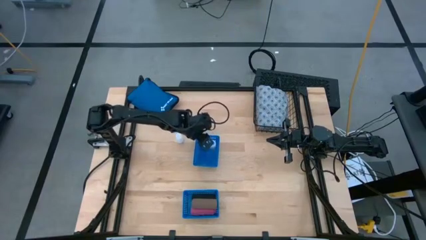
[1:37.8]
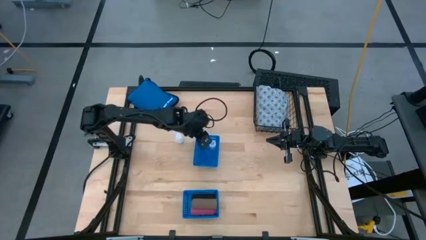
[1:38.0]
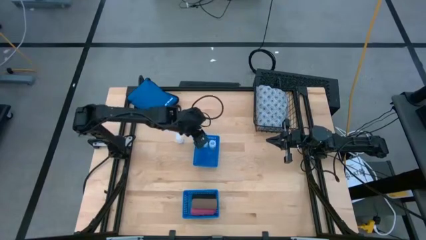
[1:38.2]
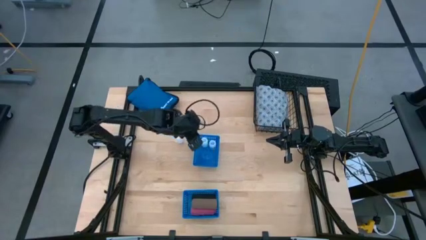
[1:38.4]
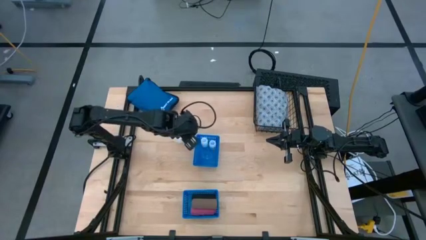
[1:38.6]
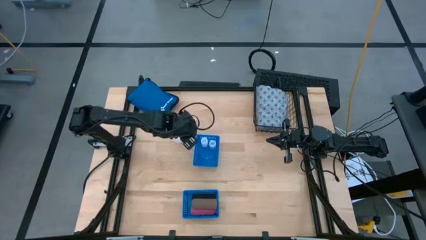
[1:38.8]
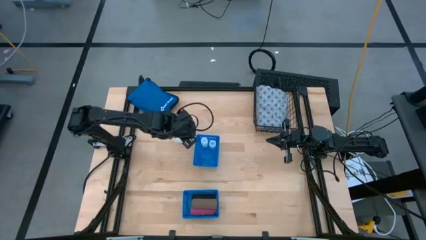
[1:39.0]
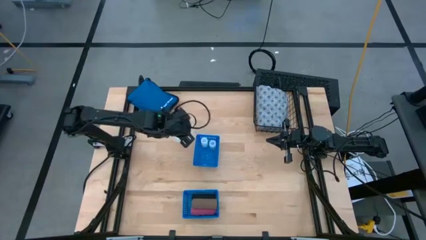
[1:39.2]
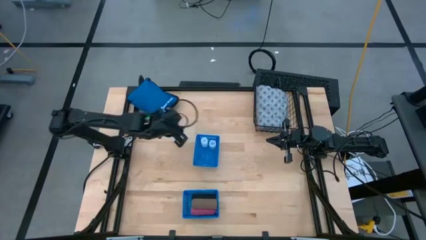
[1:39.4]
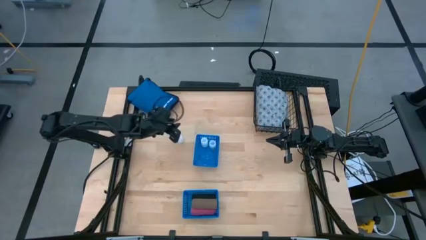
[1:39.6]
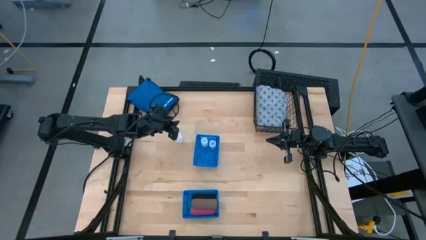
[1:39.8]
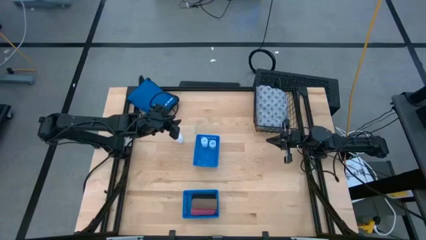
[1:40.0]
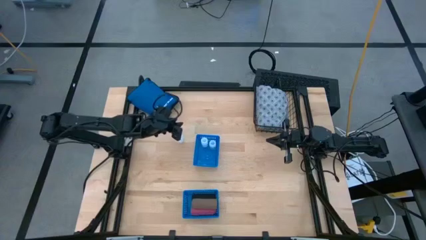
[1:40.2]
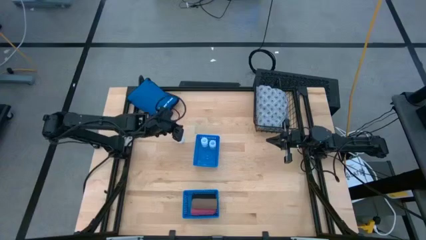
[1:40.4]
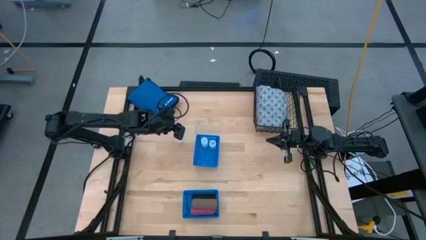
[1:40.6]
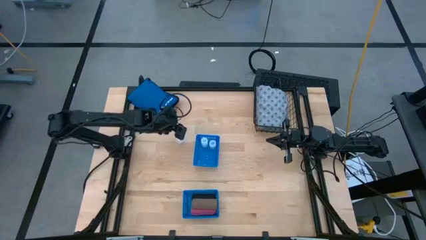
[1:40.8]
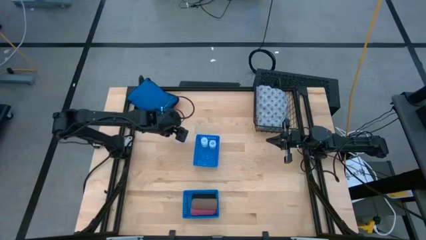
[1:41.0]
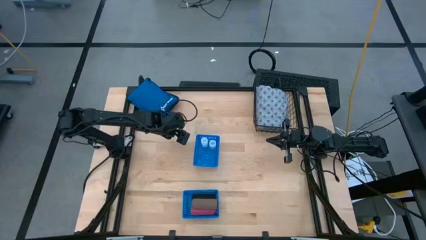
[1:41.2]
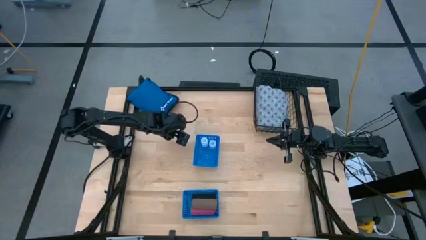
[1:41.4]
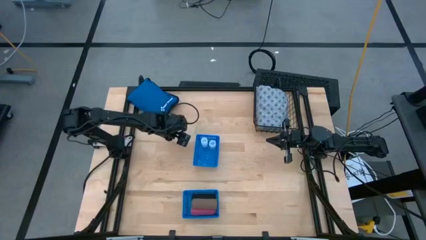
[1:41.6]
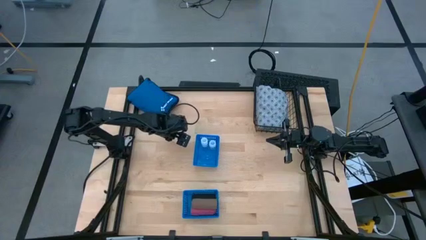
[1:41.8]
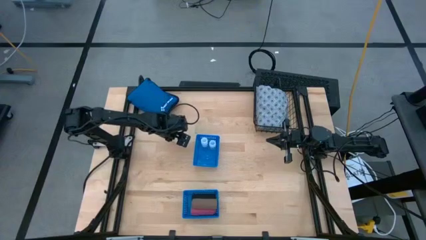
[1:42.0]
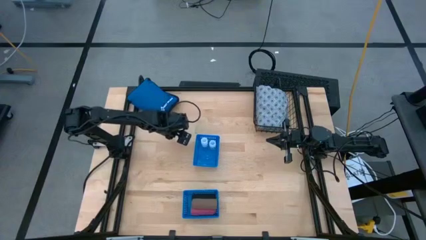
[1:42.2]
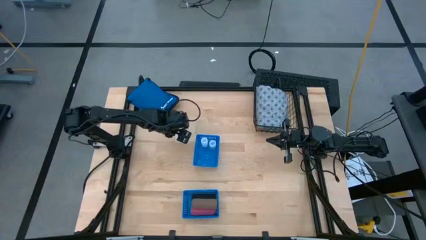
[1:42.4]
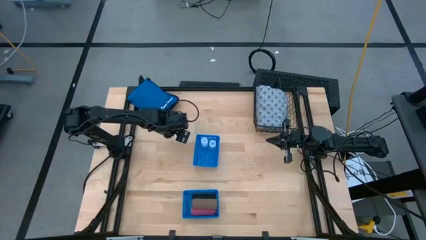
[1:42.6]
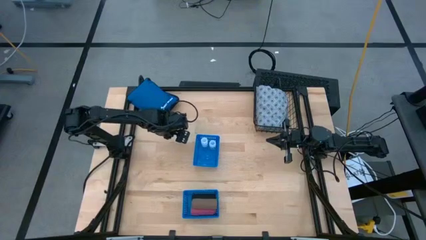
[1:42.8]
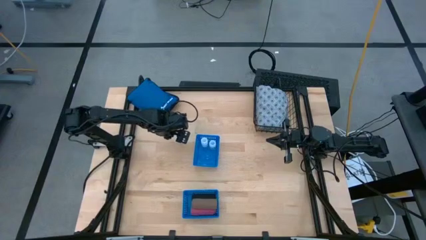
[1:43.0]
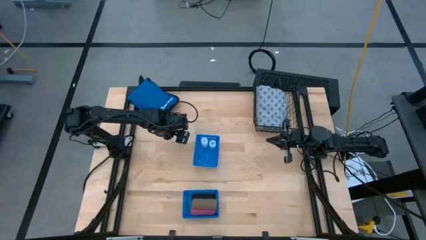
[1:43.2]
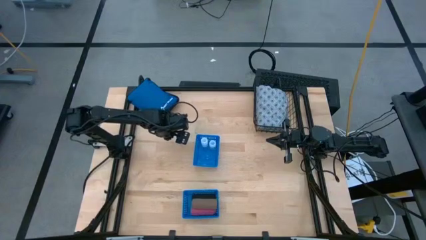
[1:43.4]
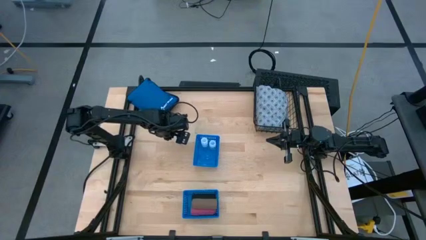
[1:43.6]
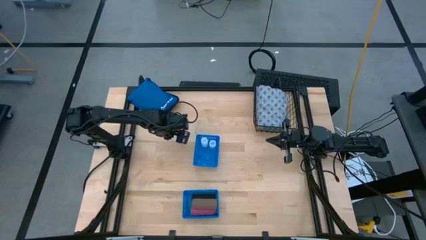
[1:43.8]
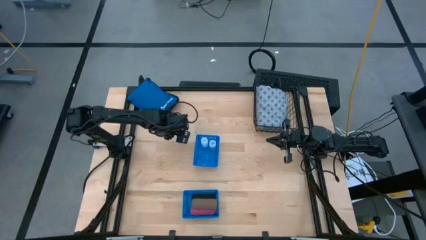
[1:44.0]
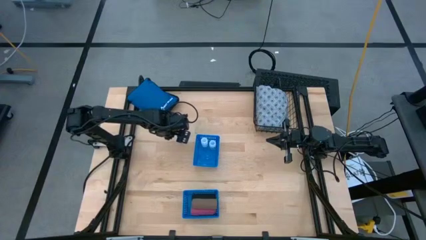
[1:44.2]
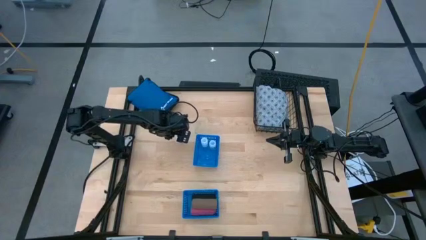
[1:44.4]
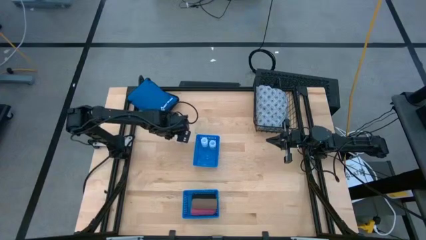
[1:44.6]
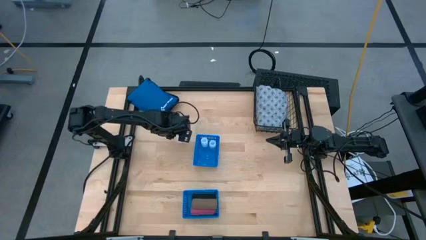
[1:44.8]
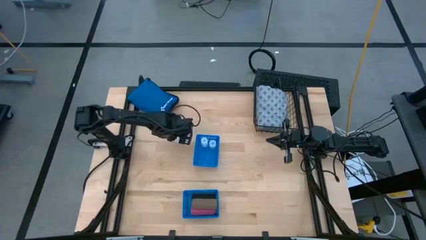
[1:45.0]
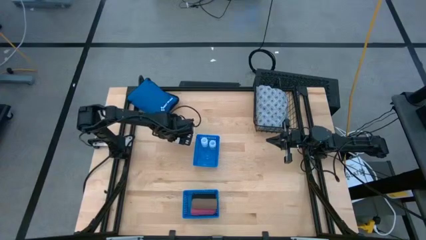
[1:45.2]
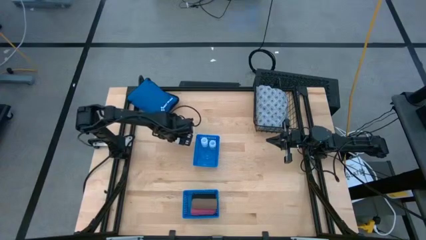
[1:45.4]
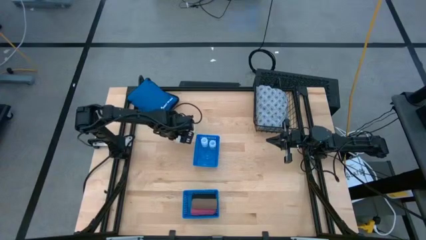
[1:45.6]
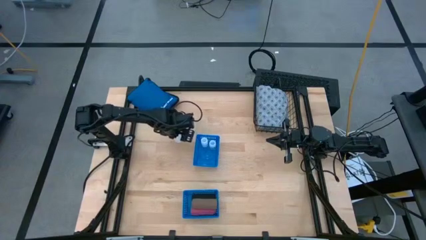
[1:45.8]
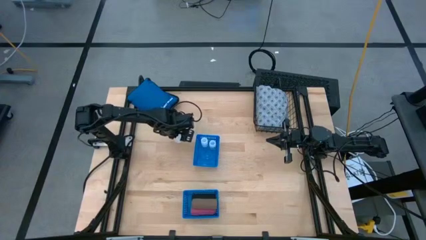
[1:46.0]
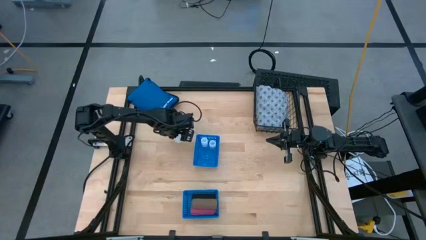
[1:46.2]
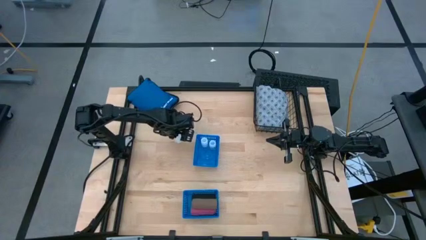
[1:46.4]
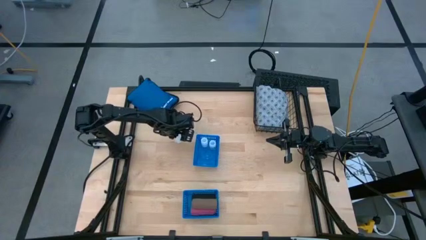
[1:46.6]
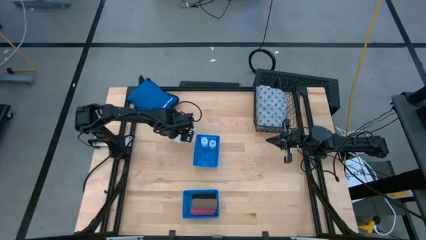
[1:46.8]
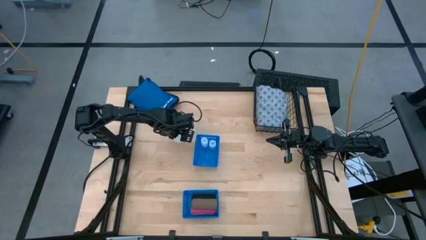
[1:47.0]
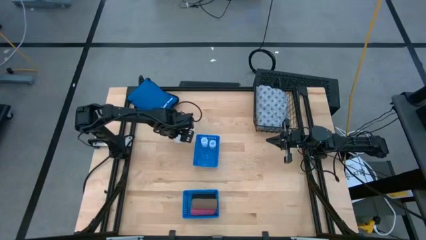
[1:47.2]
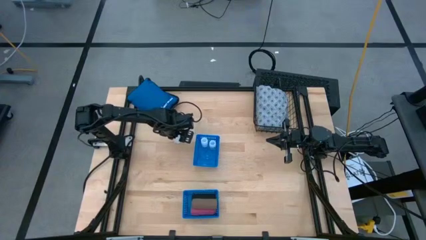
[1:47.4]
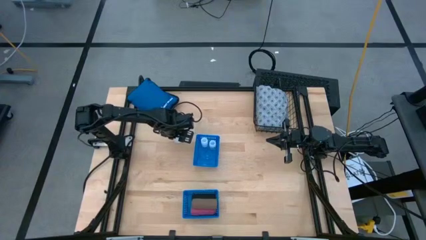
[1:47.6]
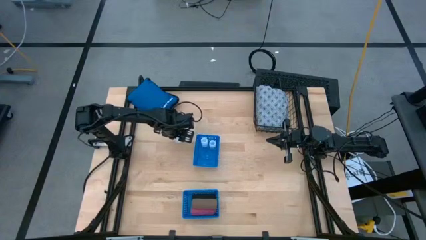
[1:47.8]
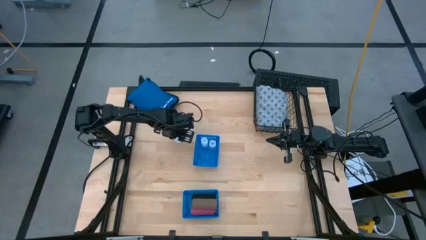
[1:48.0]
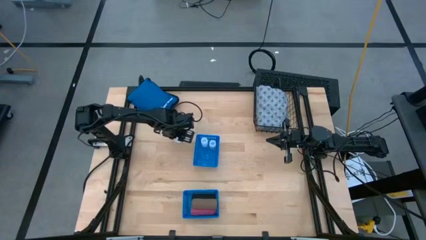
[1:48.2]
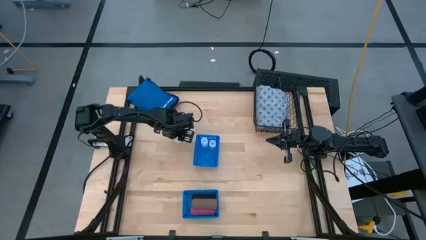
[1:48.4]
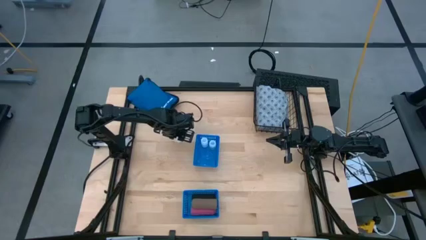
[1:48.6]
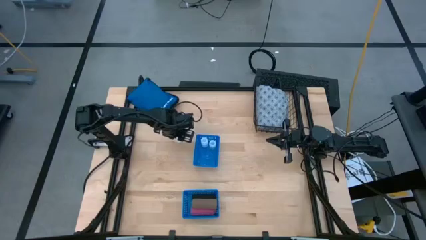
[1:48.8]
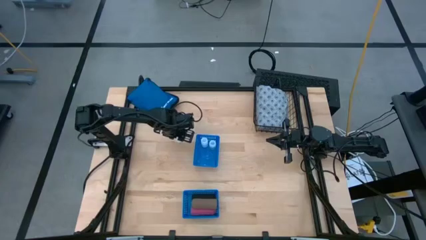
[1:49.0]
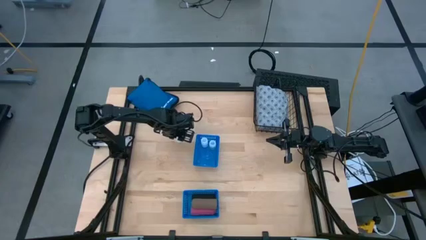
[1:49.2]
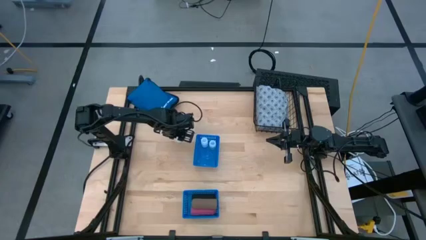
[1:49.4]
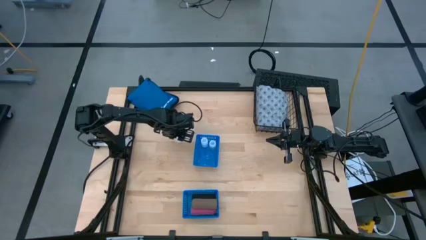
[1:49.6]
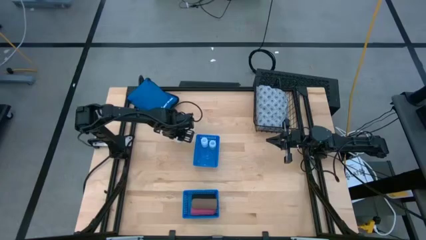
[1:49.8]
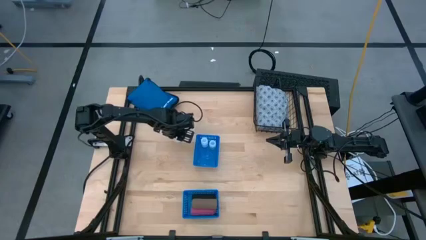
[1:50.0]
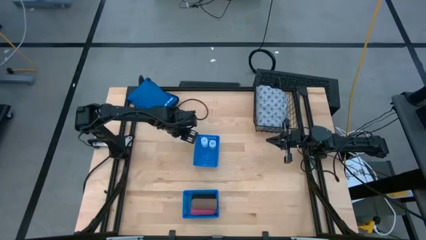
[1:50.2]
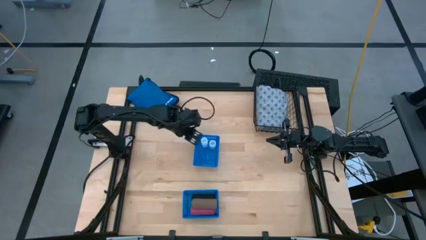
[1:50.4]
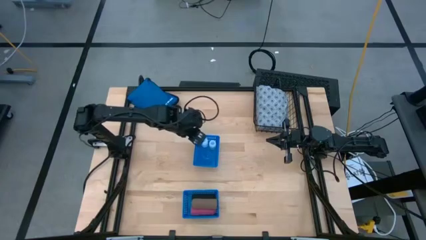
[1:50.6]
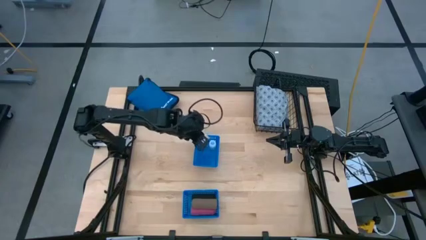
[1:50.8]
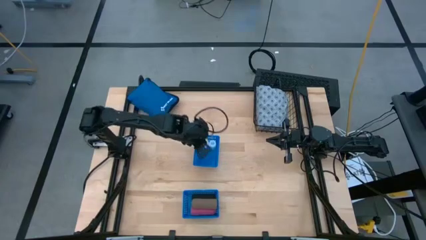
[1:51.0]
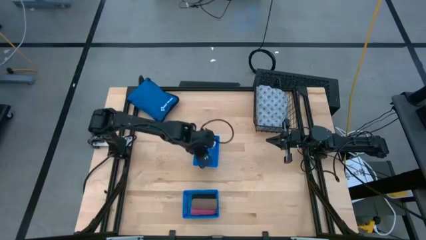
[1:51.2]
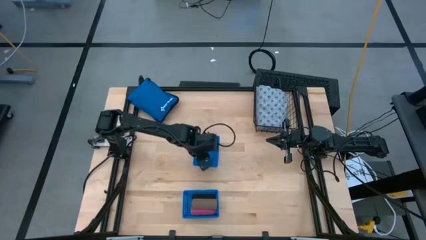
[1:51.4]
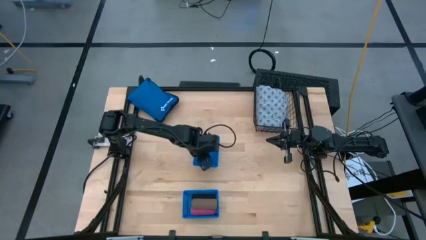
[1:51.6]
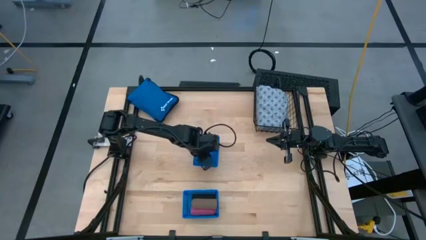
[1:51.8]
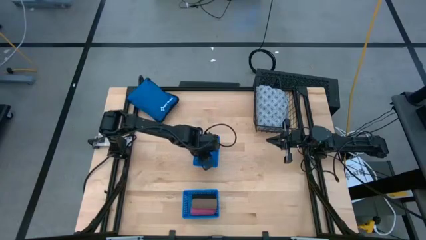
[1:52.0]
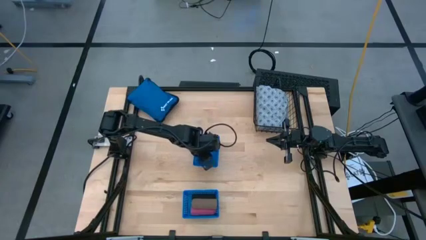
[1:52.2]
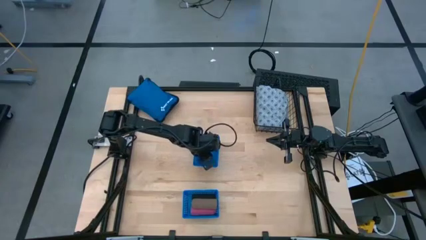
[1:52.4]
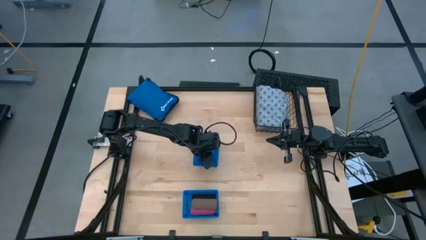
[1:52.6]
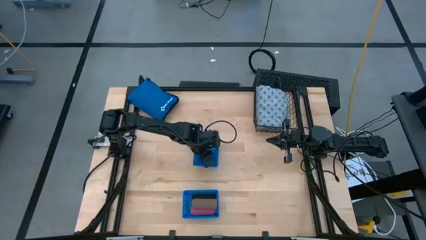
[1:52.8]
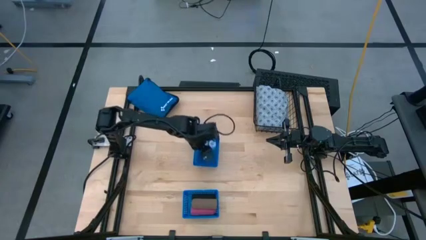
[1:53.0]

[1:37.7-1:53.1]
Task: Pick & place medical supplies in basket/bin
Put the white pill bottle into the top blue bin

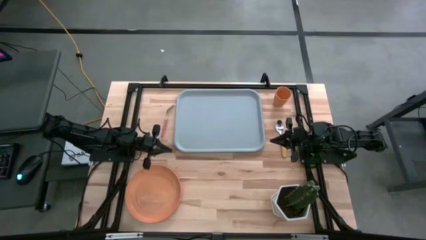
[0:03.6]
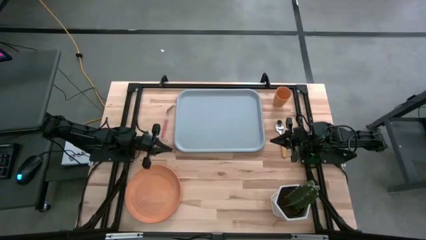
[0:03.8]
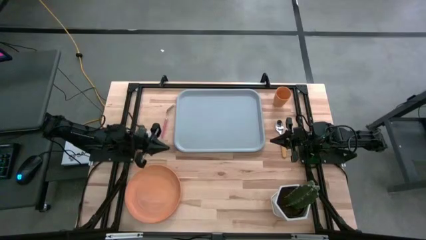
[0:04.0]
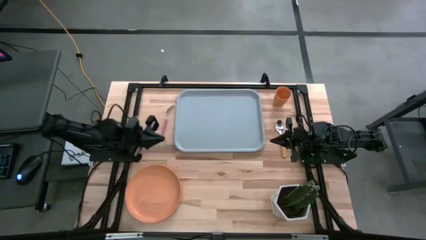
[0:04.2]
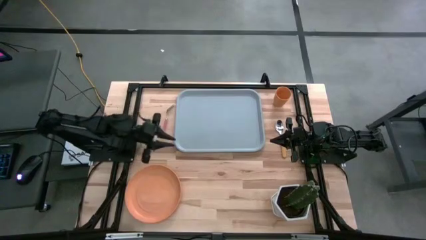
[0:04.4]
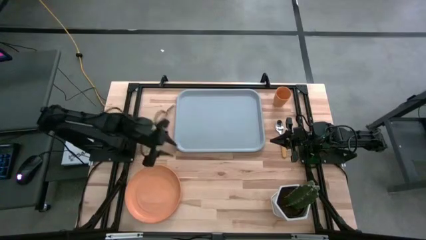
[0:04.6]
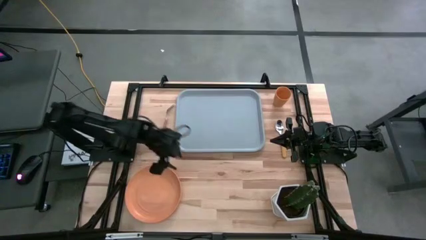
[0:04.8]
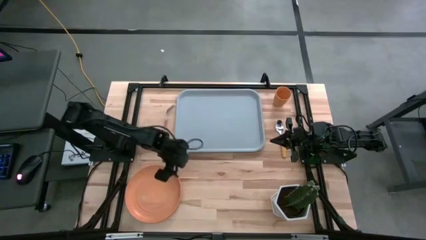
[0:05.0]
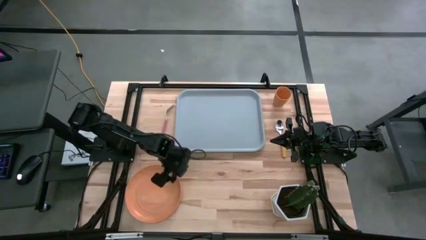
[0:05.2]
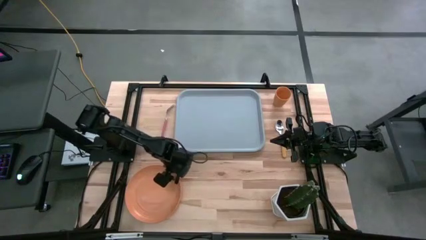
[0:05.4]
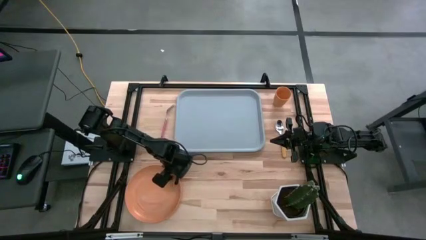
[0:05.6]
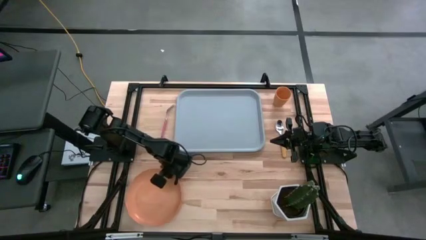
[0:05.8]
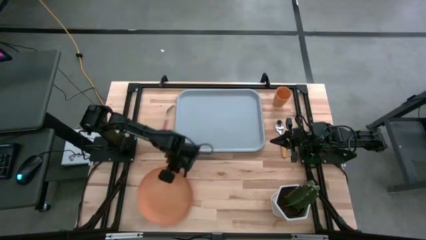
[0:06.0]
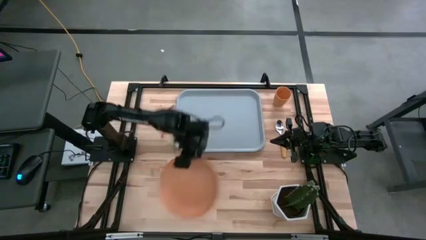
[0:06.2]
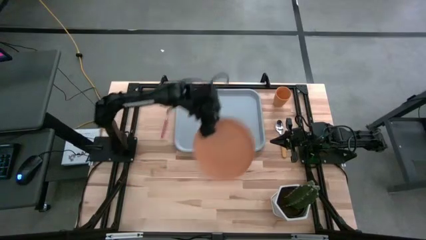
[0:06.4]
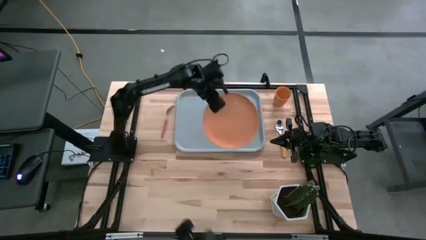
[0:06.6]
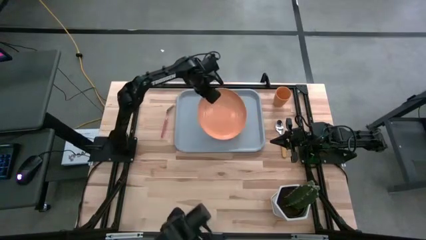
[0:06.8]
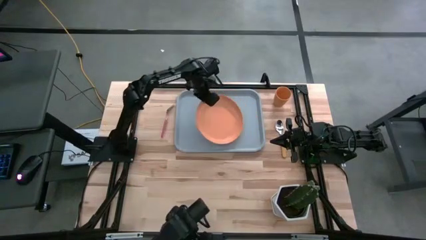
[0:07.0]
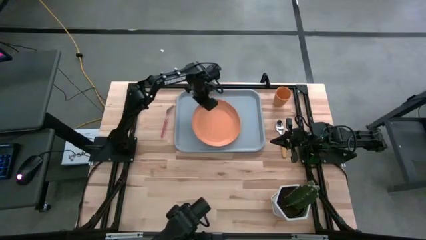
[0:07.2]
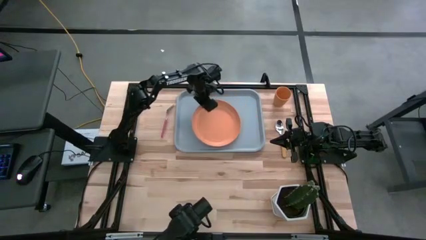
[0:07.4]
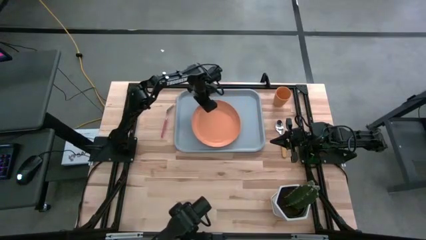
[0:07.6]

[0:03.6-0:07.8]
Task: Pick and place plate/cup/fork/spoon on tray
Put the orange plate on the center of the gray serving tray
